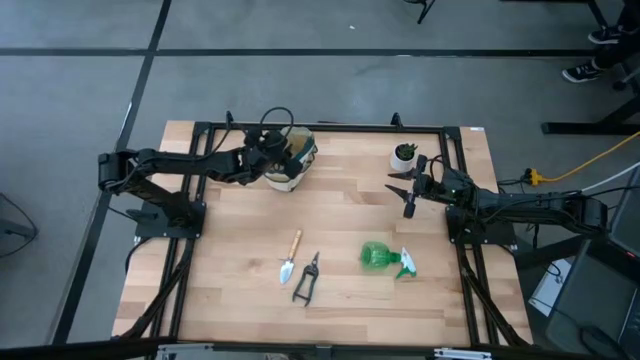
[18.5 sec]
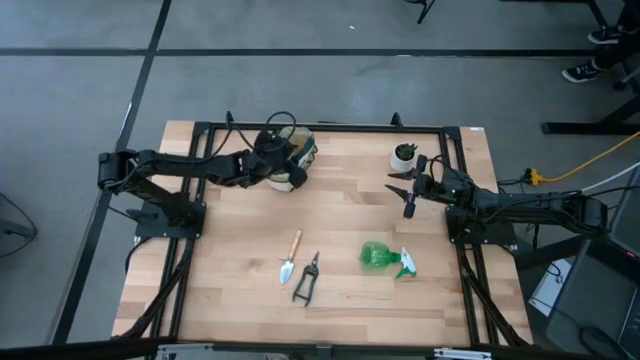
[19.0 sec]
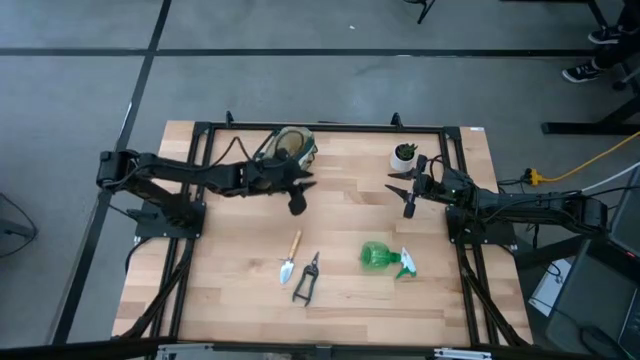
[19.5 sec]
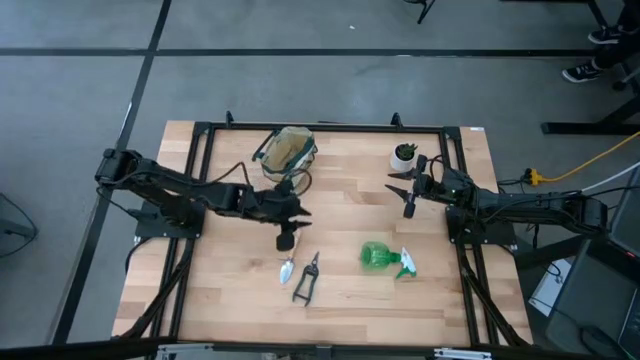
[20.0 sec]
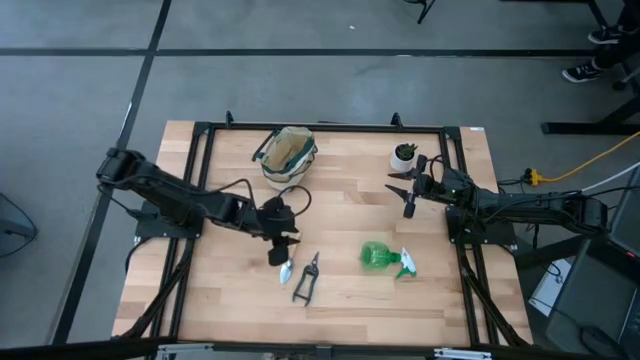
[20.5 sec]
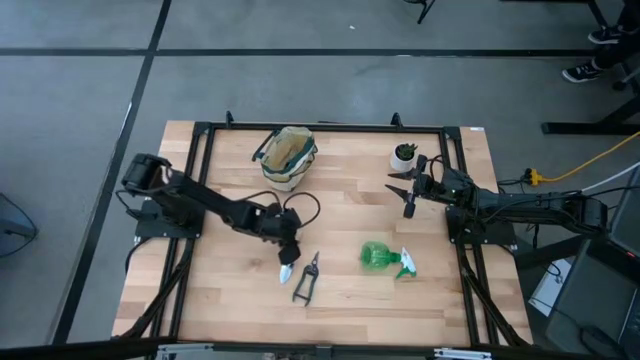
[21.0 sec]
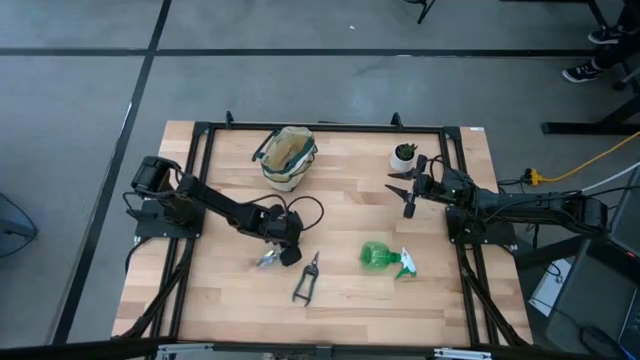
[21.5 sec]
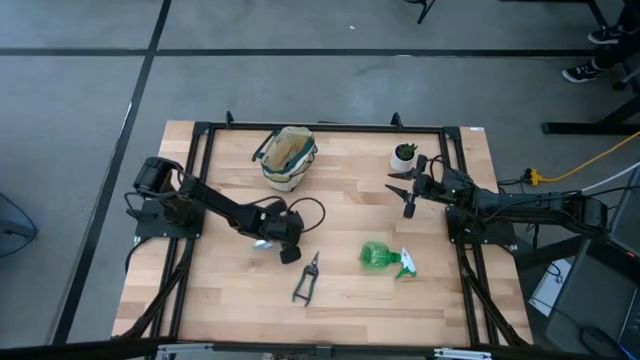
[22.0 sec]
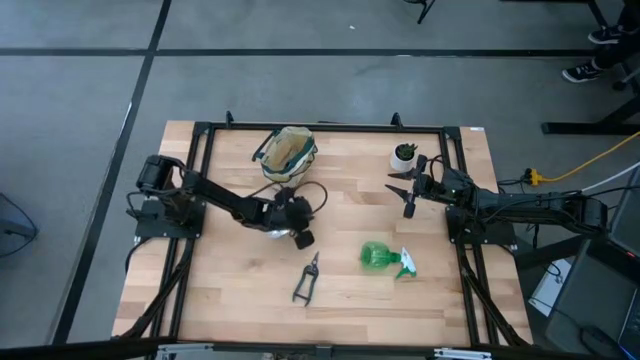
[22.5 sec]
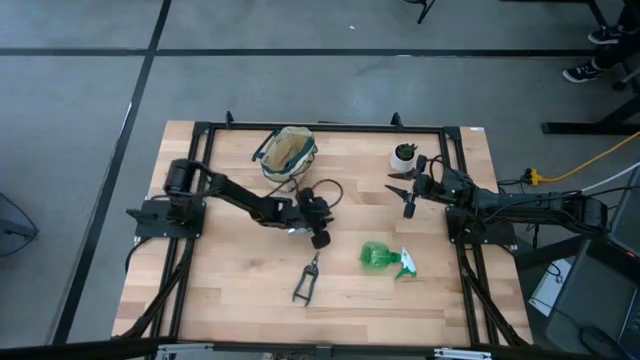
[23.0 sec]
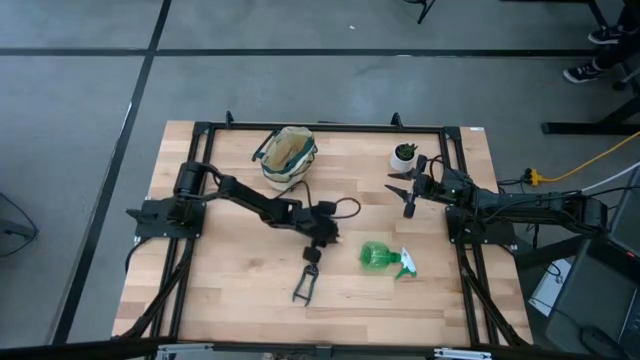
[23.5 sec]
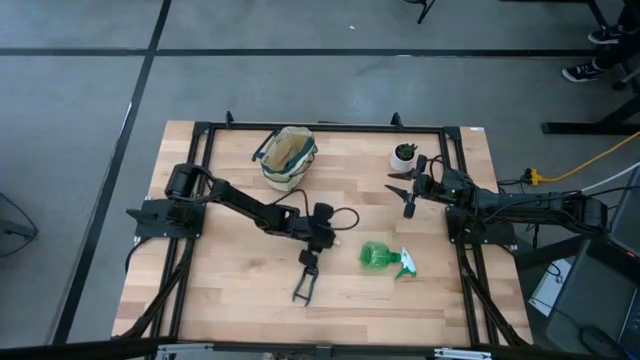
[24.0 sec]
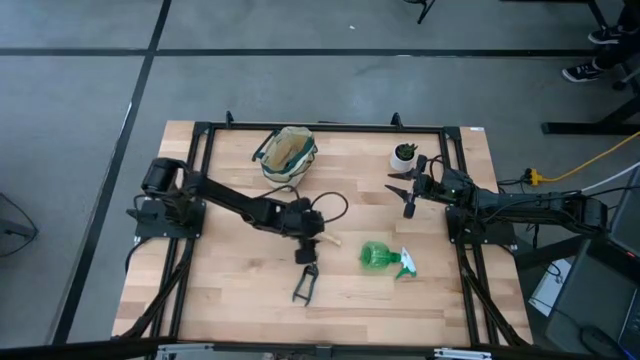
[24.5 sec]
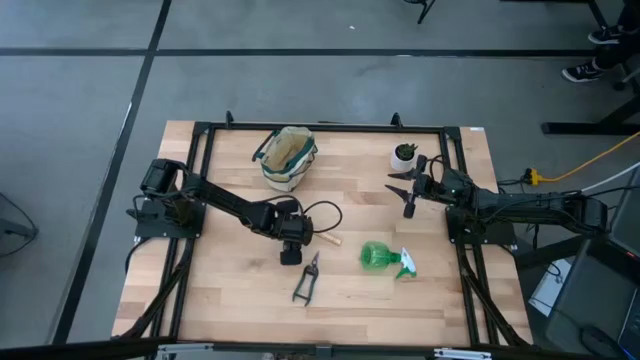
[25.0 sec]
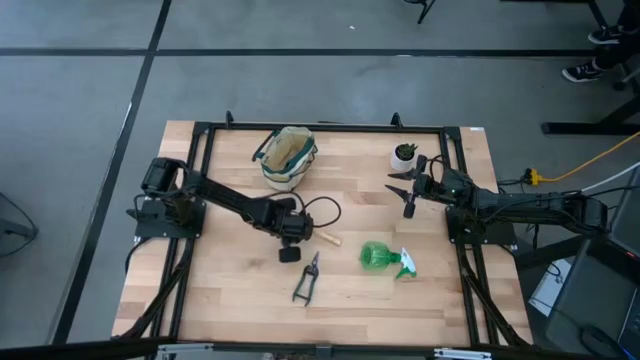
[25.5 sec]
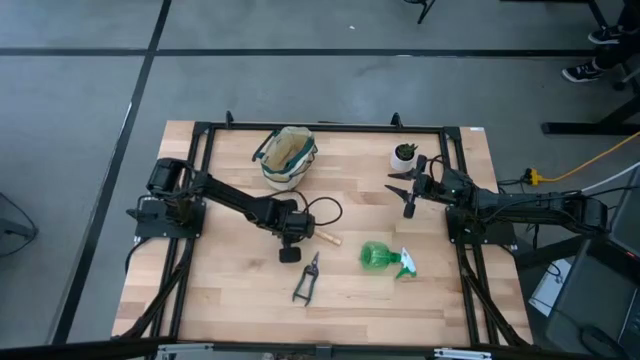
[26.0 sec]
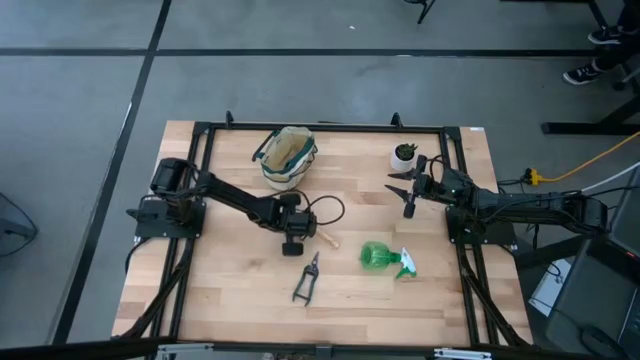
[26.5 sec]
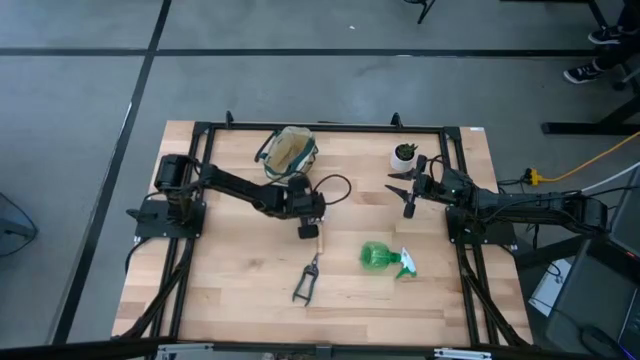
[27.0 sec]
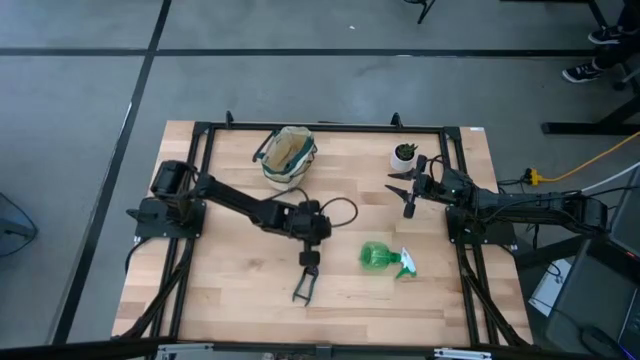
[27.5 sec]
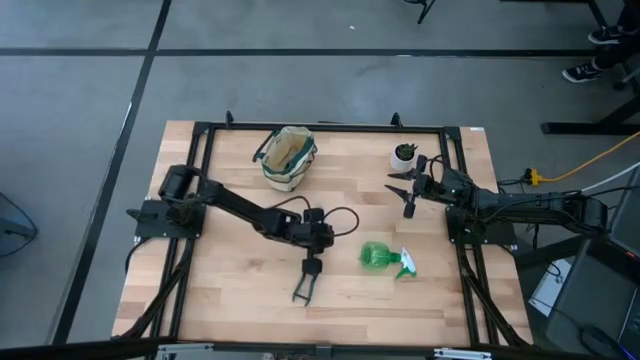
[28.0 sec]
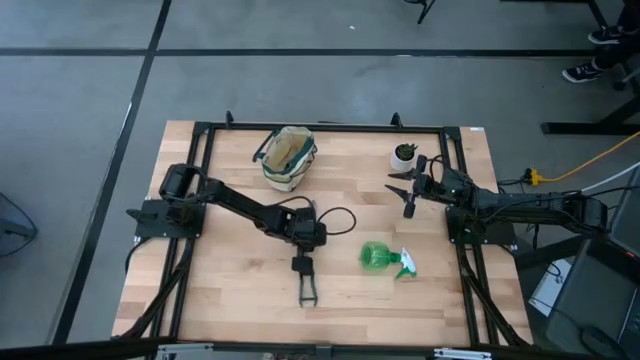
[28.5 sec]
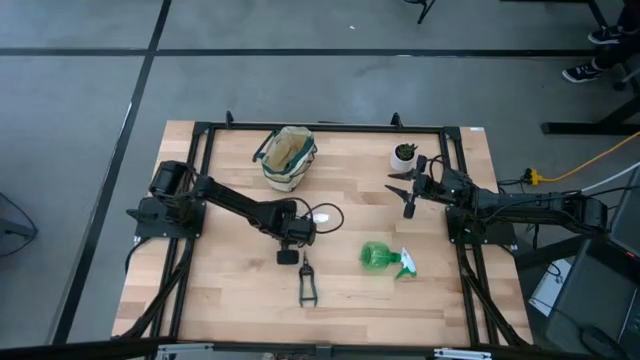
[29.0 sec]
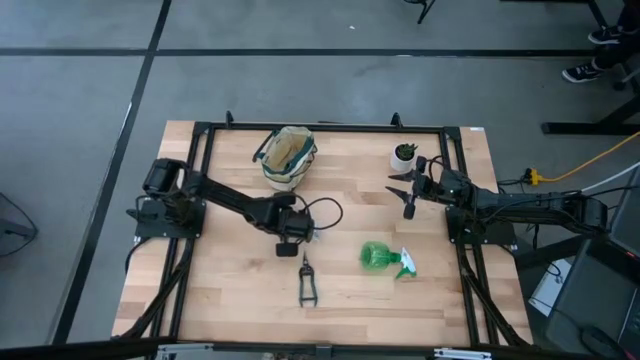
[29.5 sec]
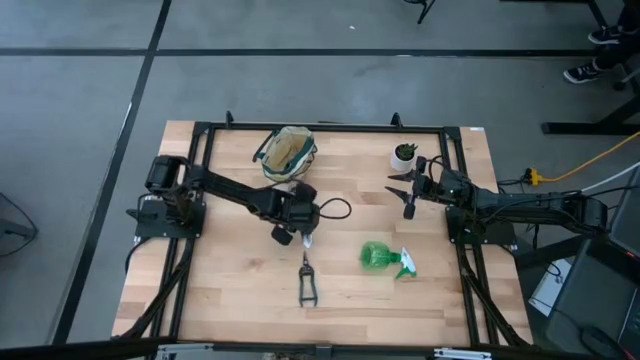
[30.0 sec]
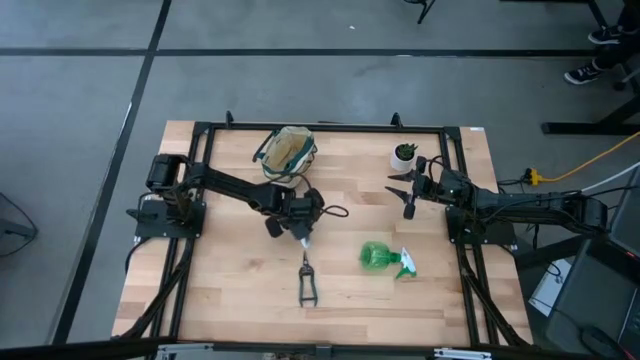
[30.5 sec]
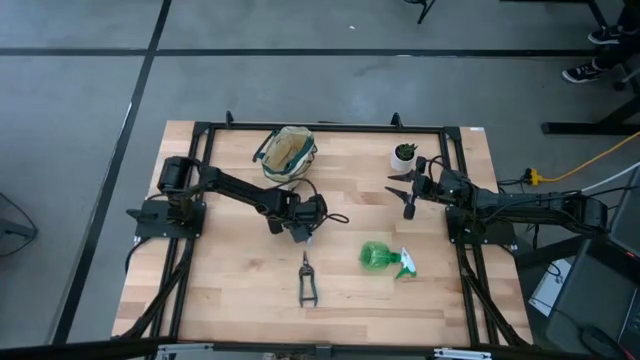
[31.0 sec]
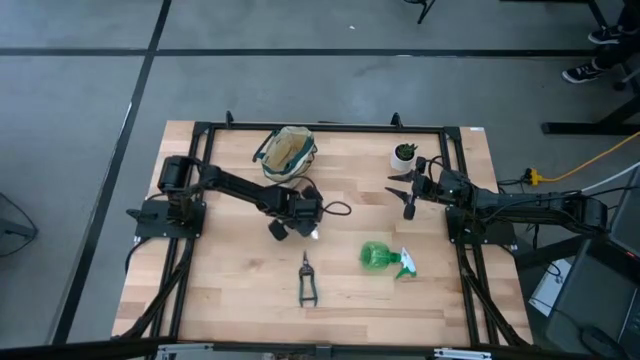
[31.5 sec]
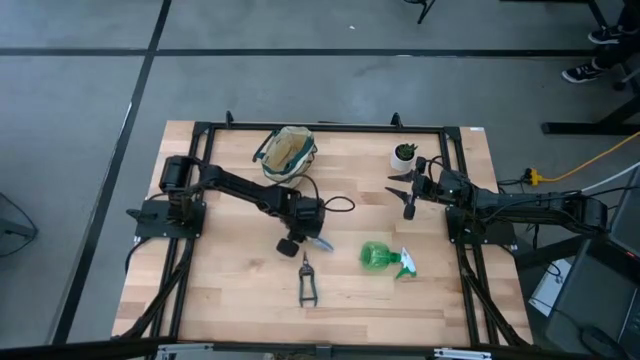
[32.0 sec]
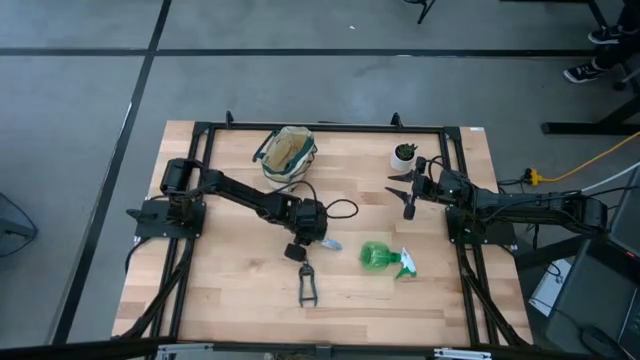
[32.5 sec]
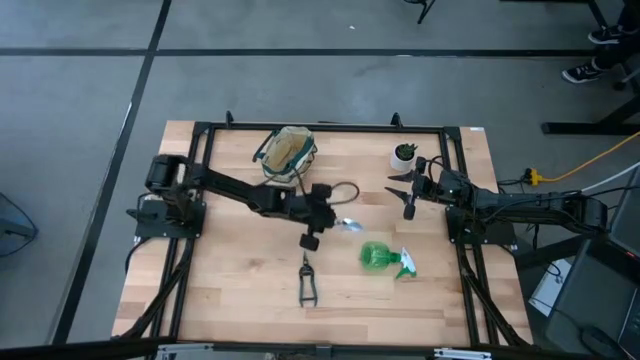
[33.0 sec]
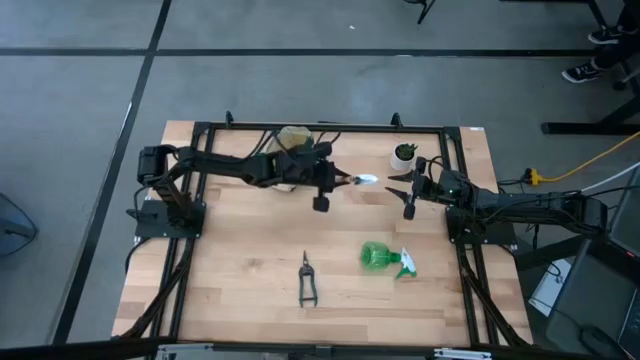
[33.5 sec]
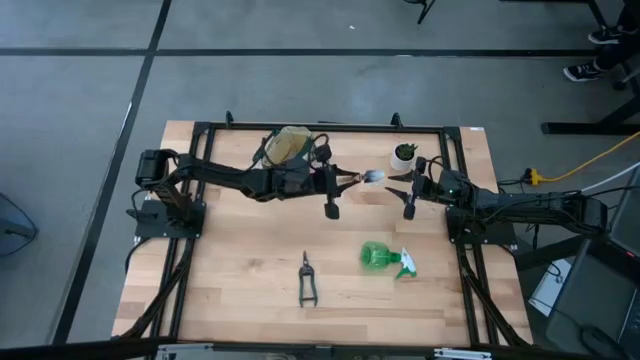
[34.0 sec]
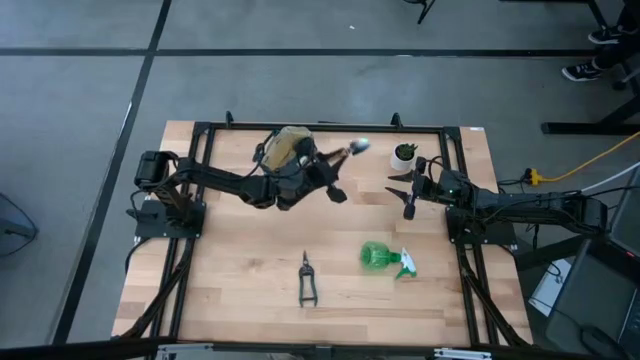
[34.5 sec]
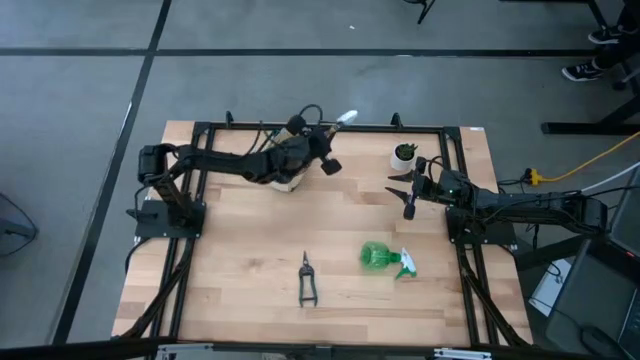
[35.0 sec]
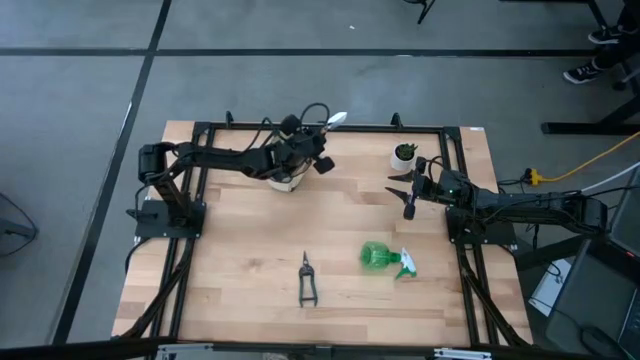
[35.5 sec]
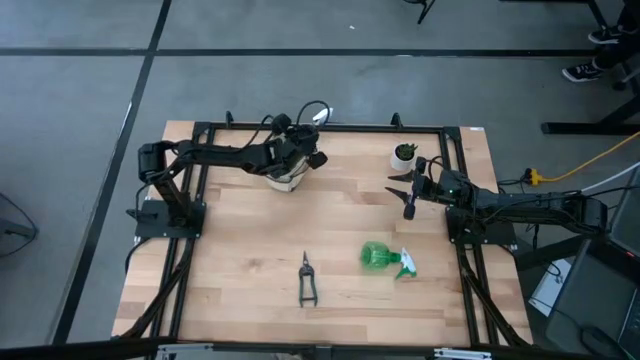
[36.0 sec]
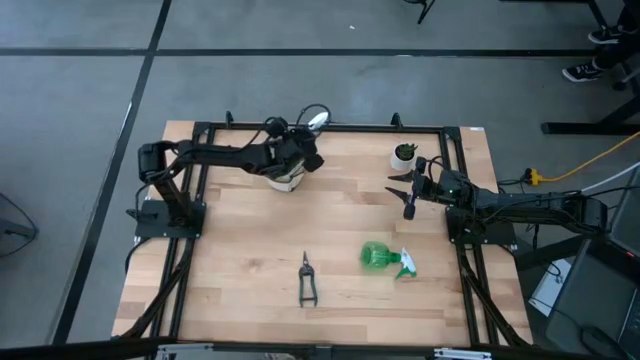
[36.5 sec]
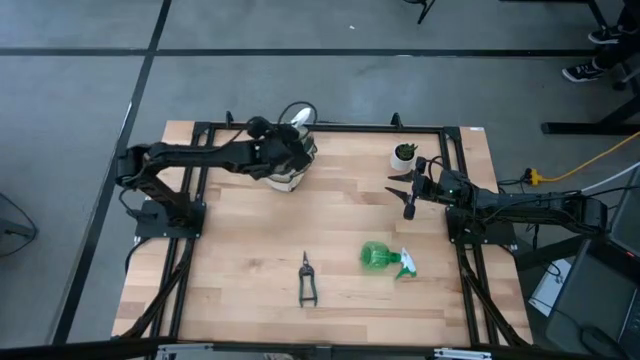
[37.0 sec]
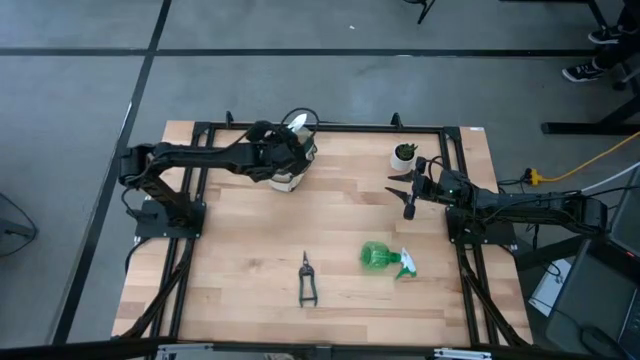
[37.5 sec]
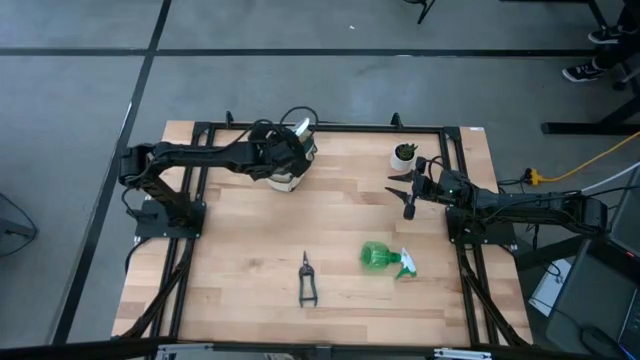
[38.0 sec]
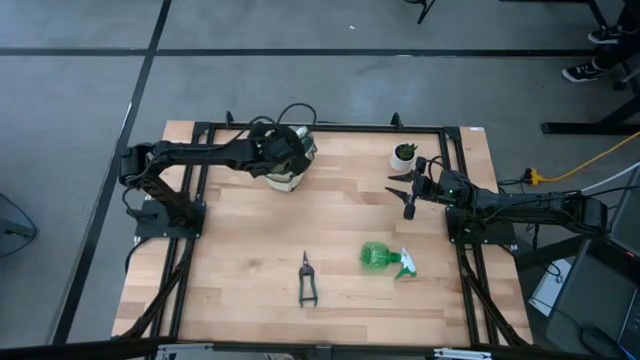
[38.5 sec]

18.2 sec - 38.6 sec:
Task: Pick & Place Garden tools in Gardening bag
Put the trowel into the gardening bag
